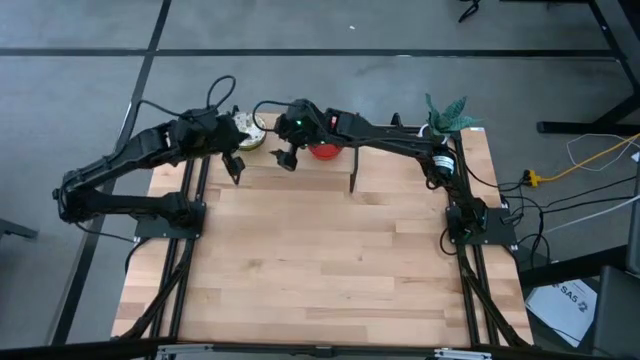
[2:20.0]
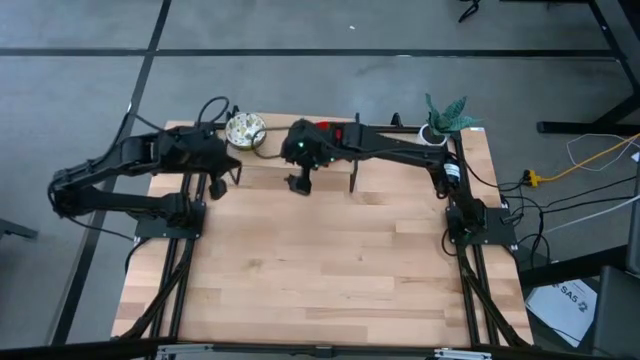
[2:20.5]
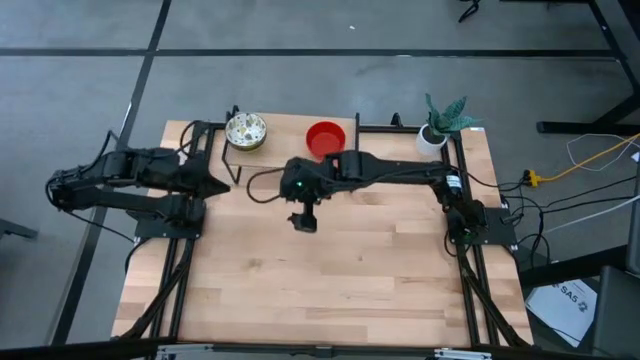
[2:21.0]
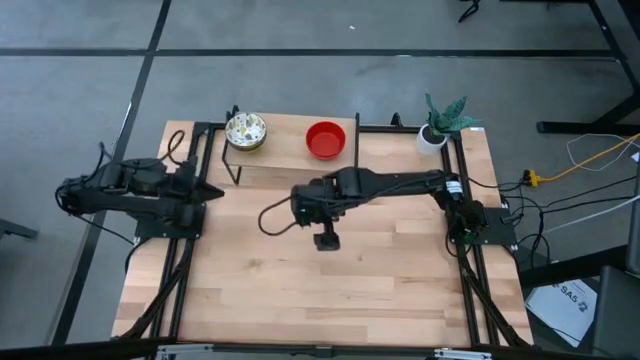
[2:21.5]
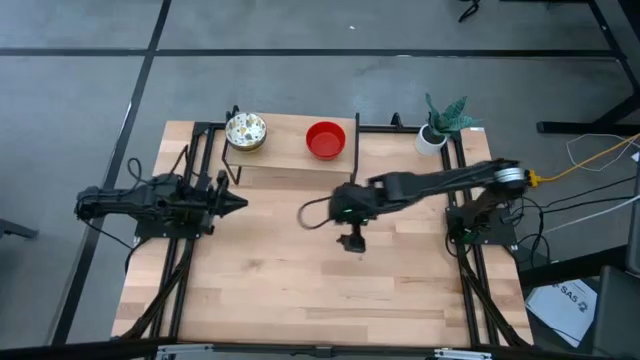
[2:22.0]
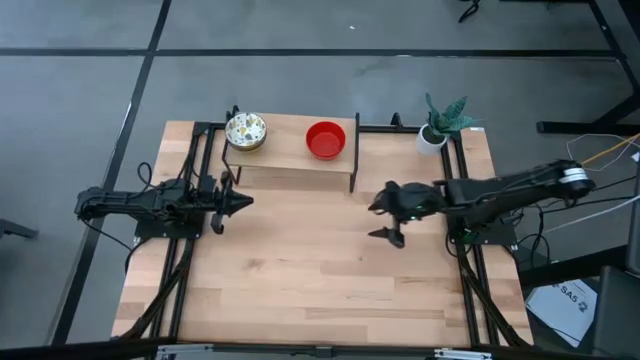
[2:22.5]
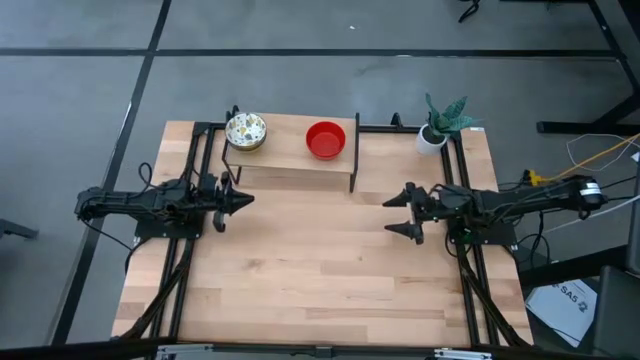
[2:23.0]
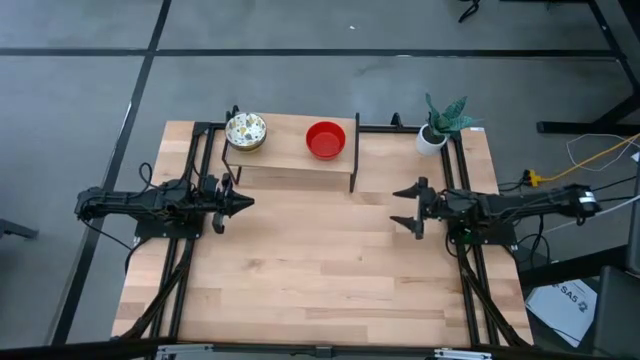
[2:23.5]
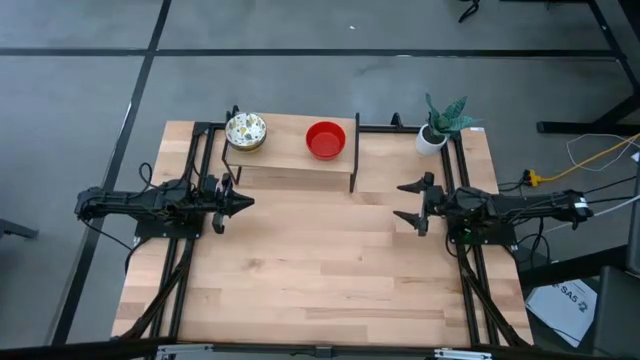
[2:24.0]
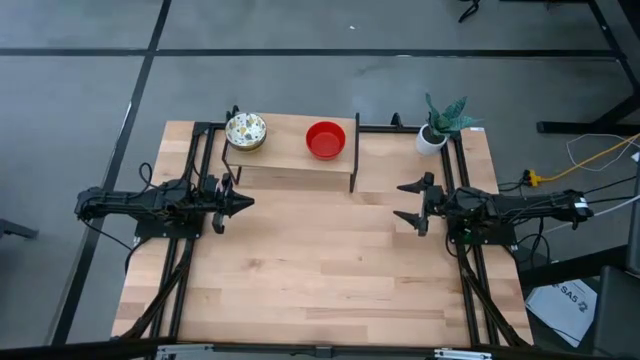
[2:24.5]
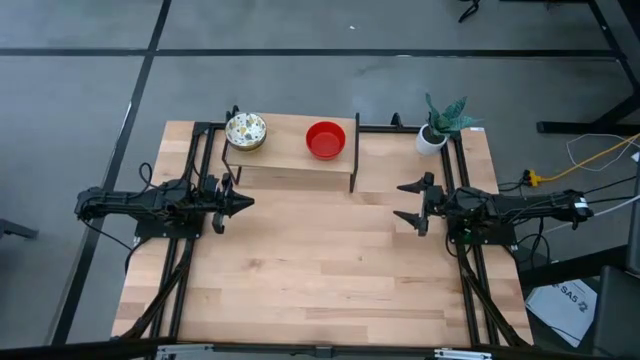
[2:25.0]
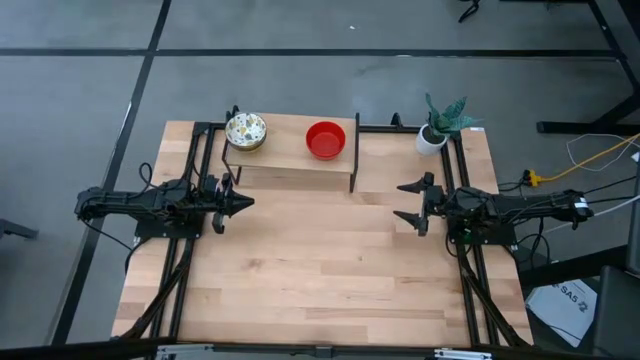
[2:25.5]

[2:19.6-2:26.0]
Task: Pick & Place Mini bowls
Return to Home Position

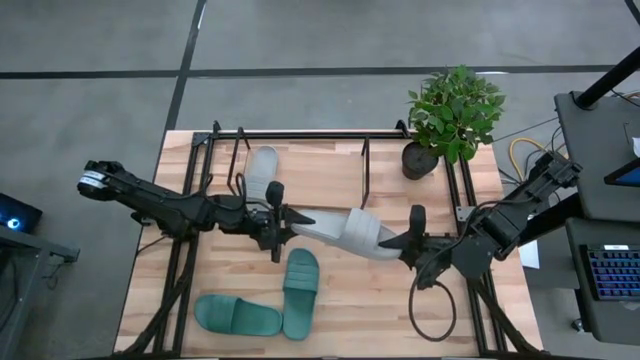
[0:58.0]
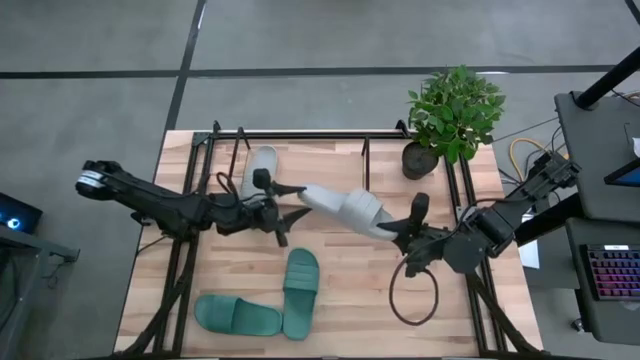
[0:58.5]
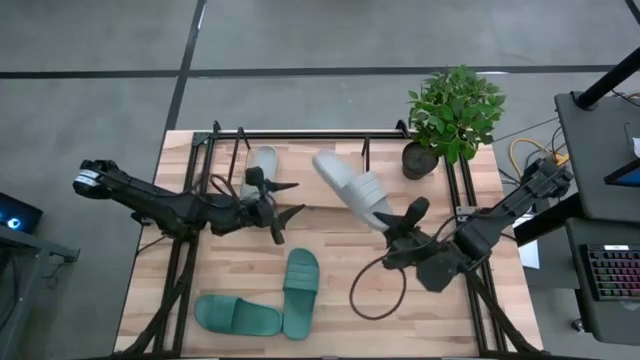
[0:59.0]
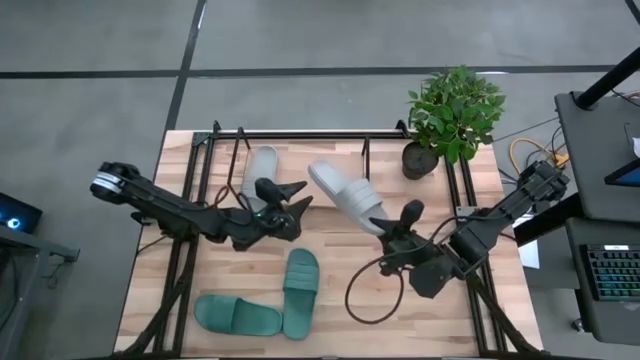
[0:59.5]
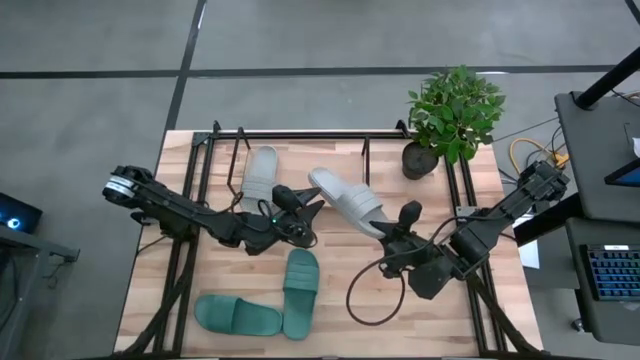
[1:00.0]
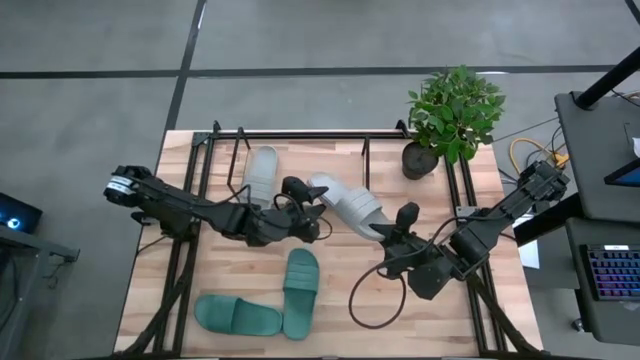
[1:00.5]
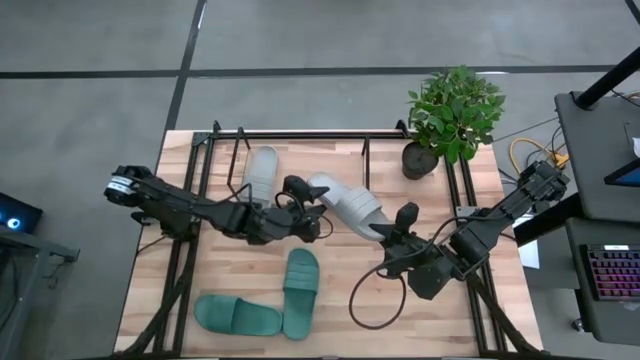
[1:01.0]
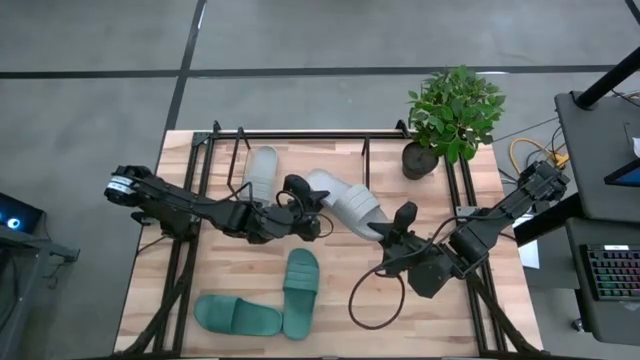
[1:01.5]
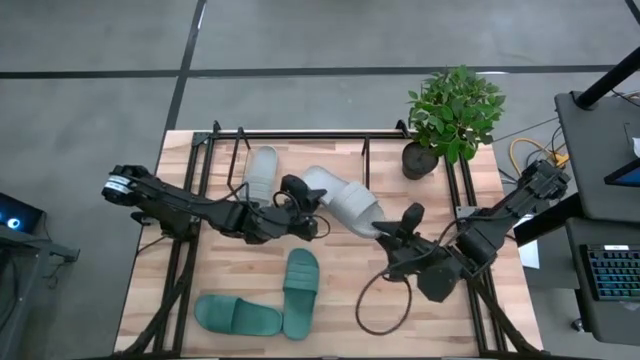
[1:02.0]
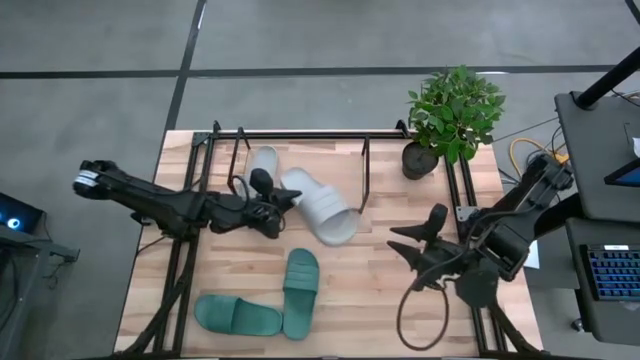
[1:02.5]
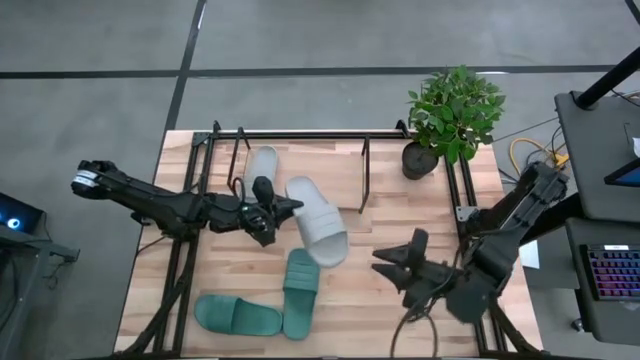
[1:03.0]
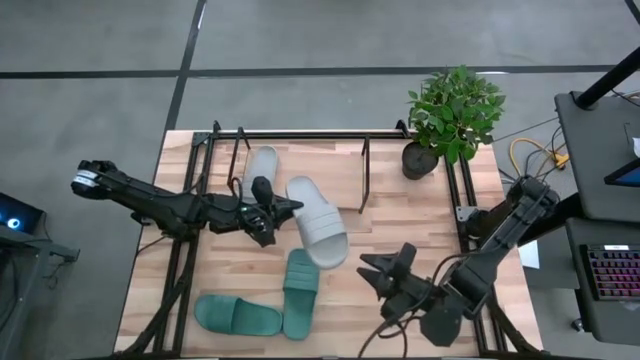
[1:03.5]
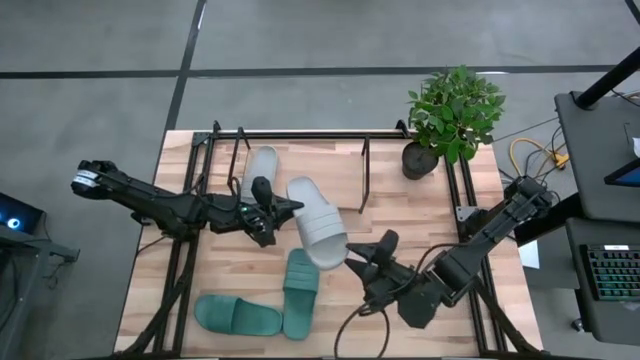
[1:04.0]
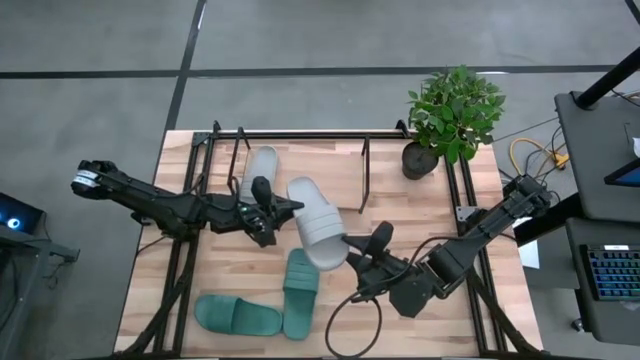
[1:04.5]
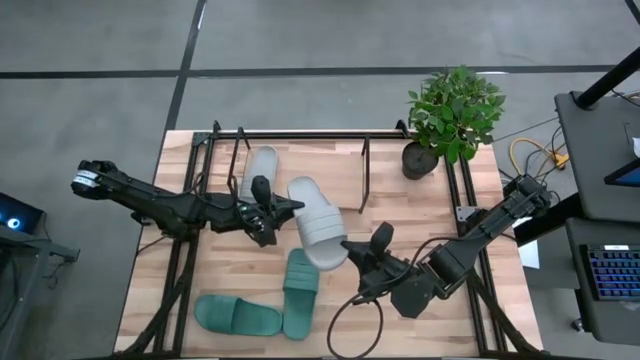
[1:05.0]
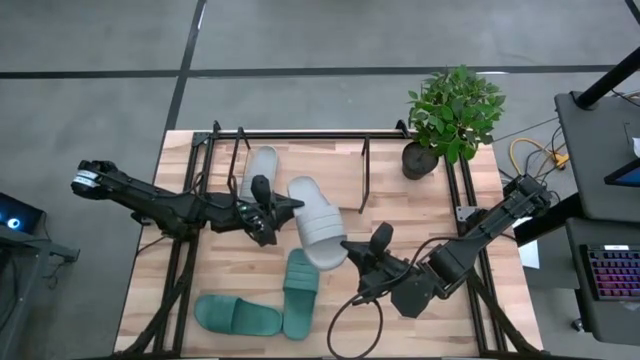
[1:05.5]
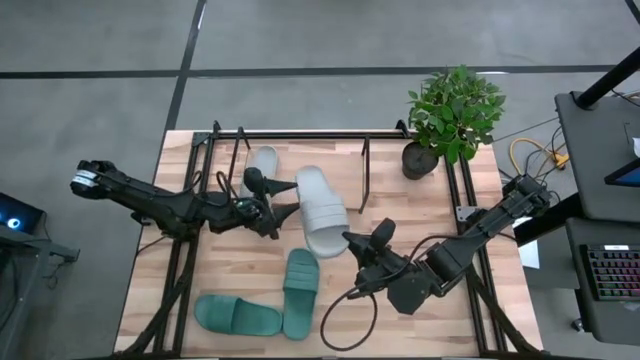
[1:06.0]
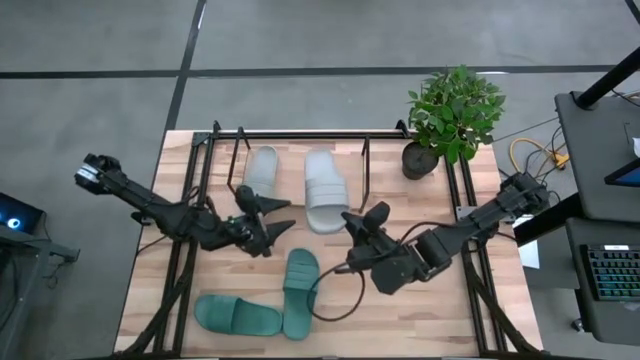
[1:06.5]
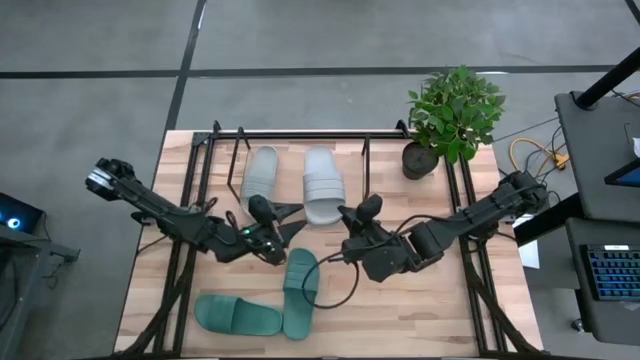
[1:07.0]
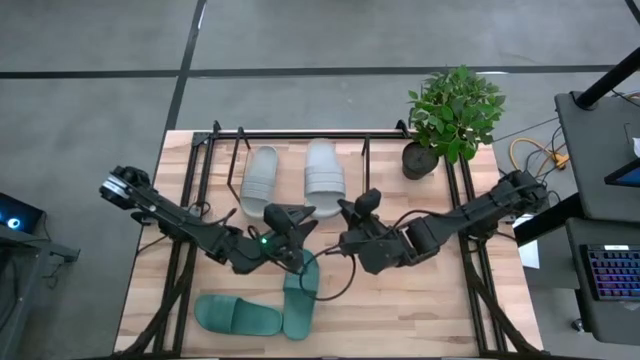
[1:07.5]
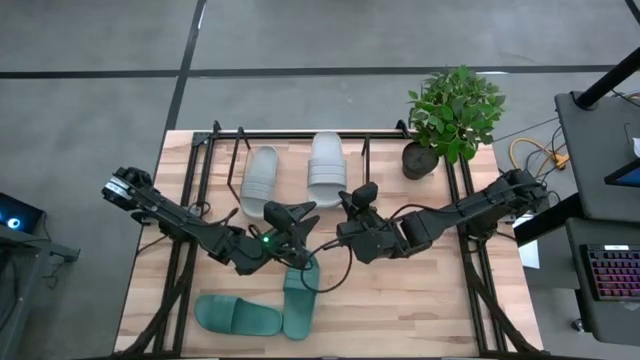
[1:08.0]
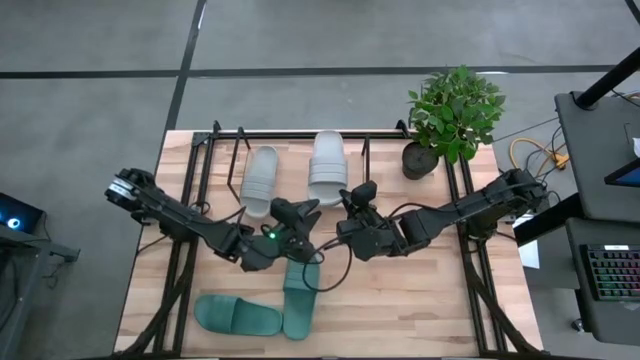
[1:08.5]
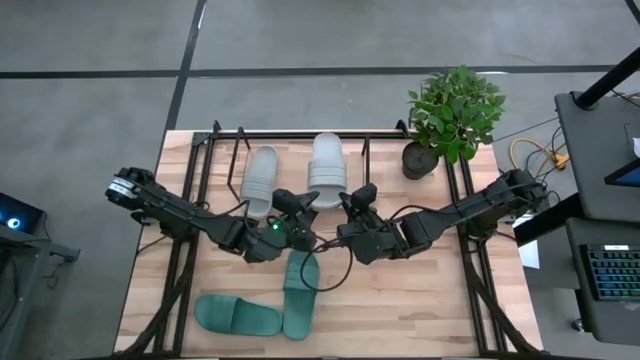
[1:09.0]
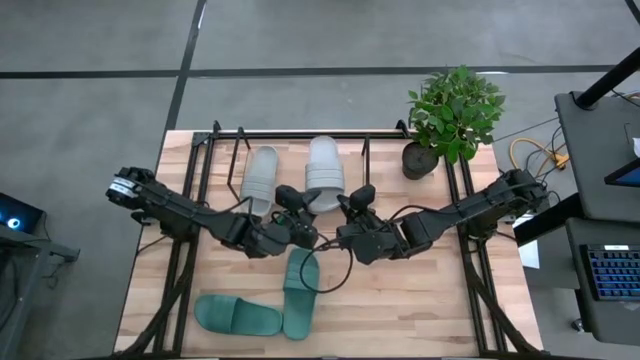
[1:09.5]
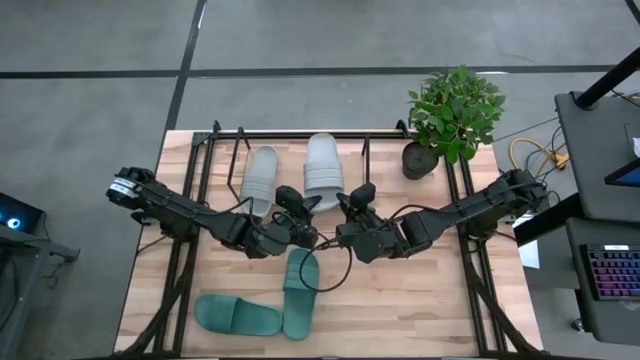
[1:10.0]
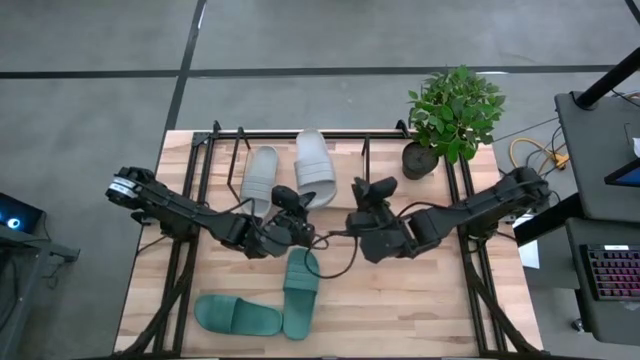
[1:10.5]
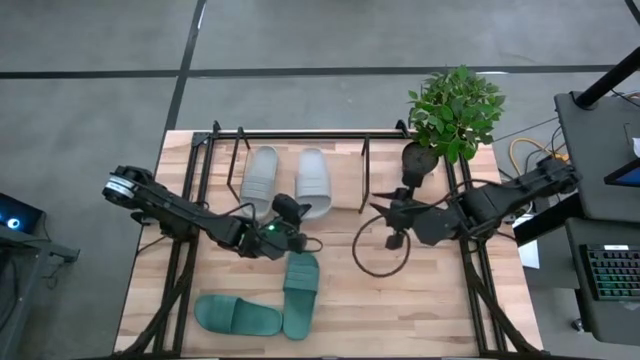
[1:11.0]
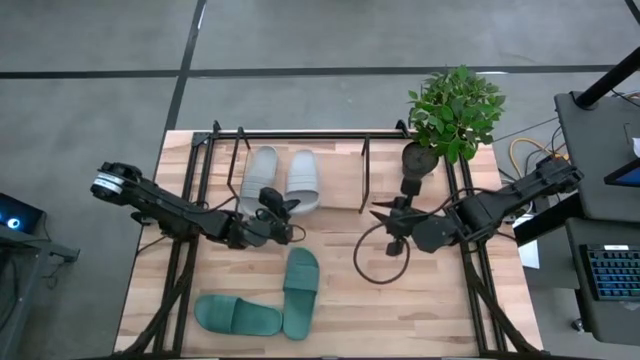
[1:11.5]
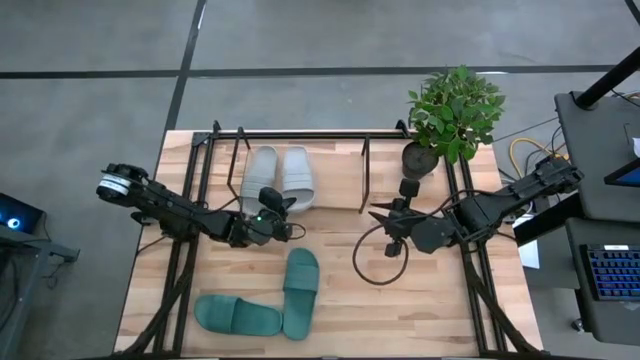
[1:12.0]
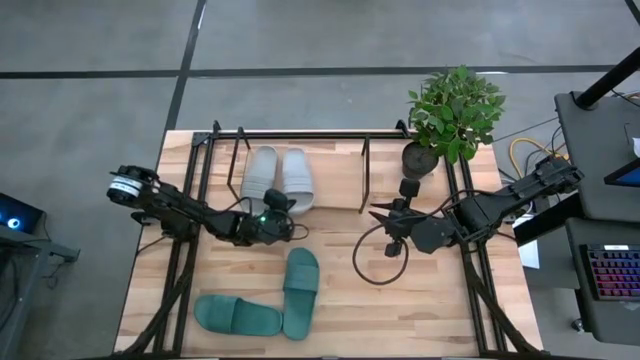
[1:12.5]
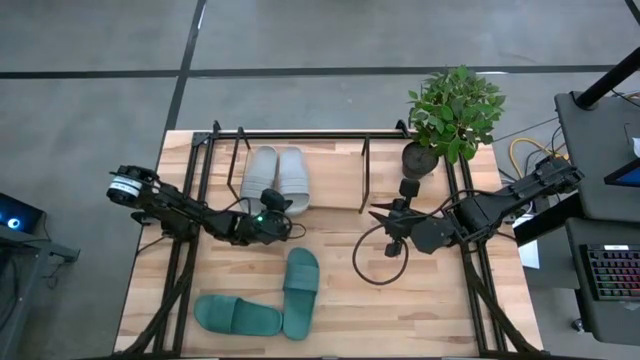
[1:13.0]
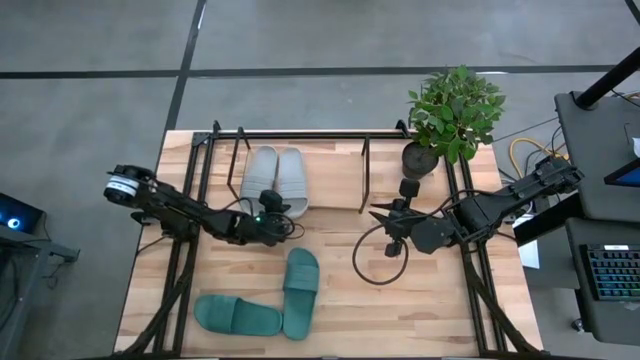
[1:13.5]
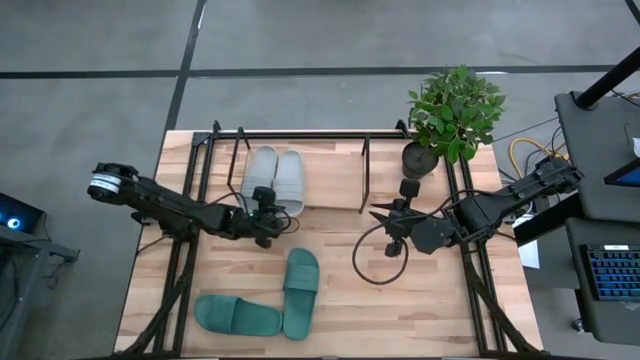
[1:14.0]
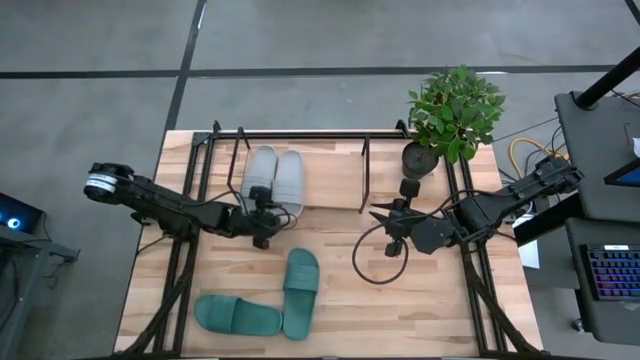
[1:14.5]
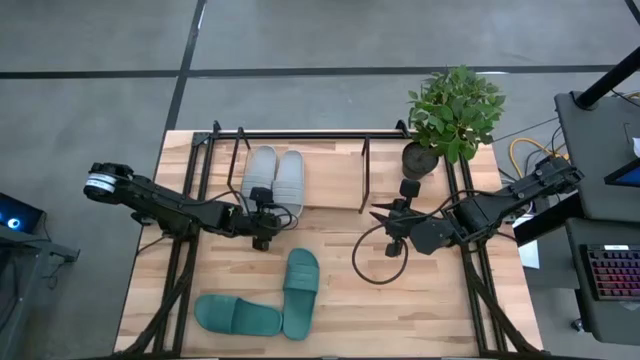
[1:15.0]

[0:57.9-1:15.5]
Task: Pick and place slides into the shelf
Put the left grey slide on the shelf
